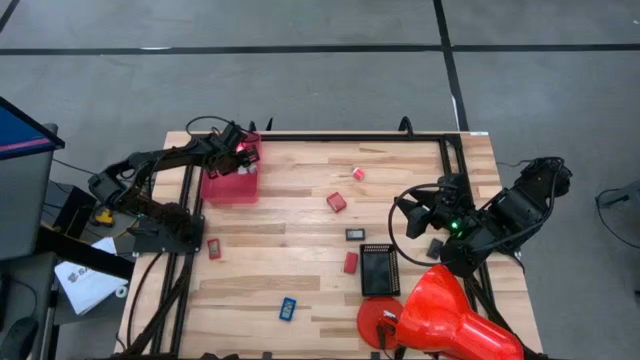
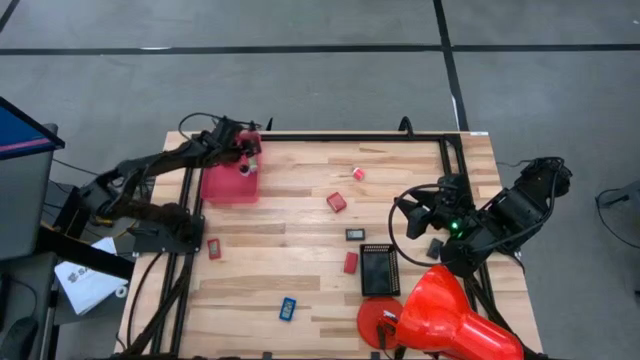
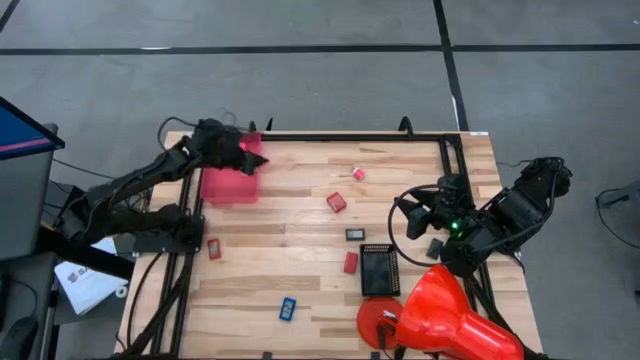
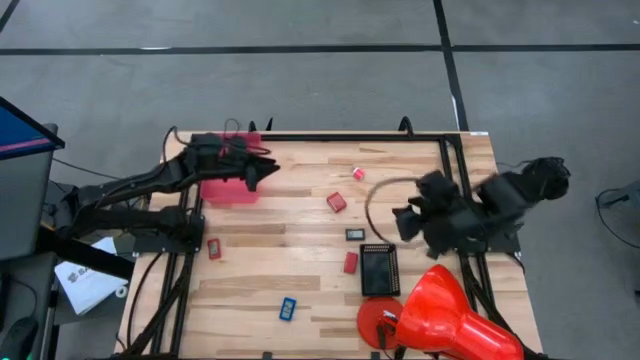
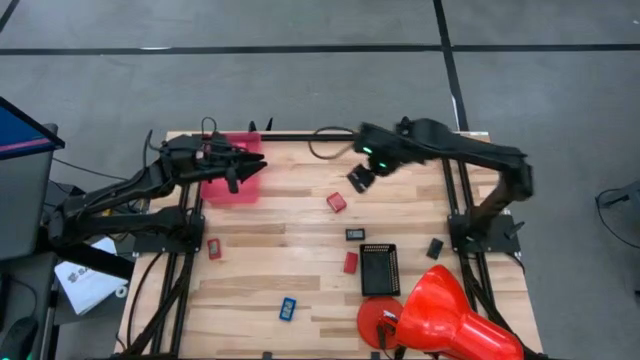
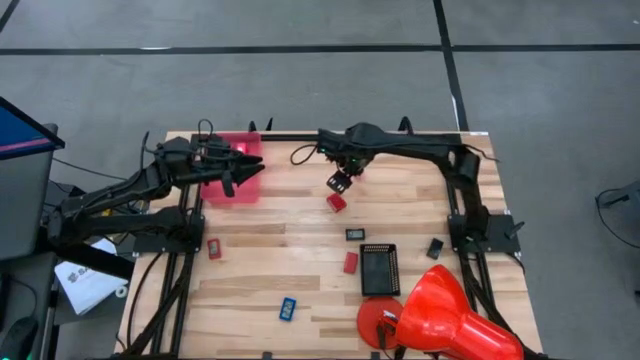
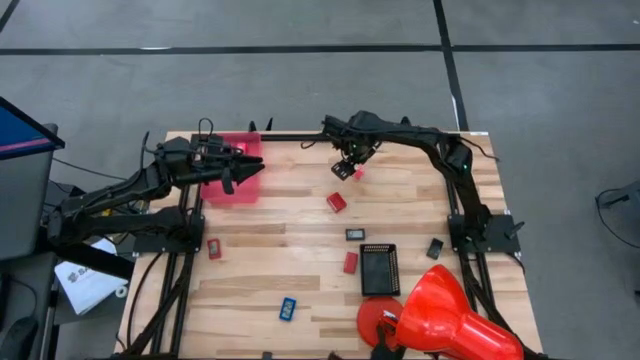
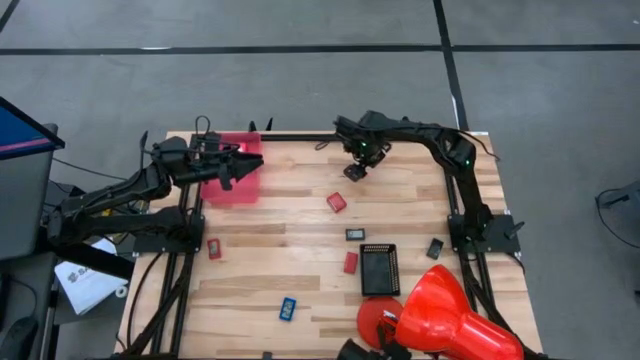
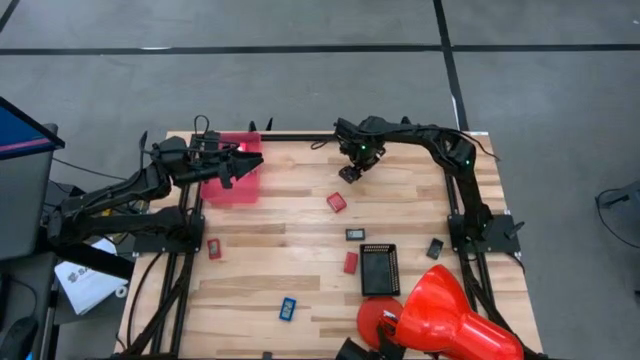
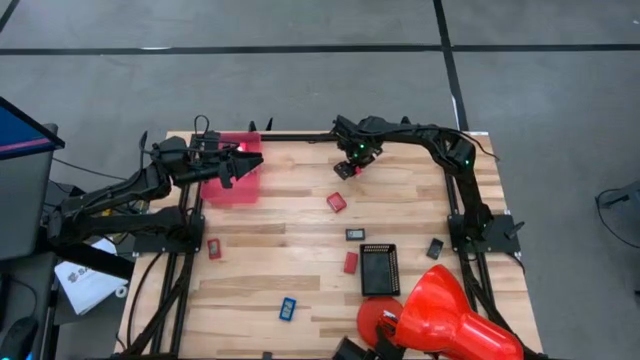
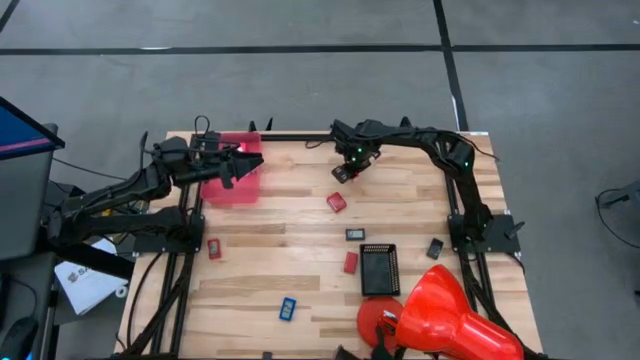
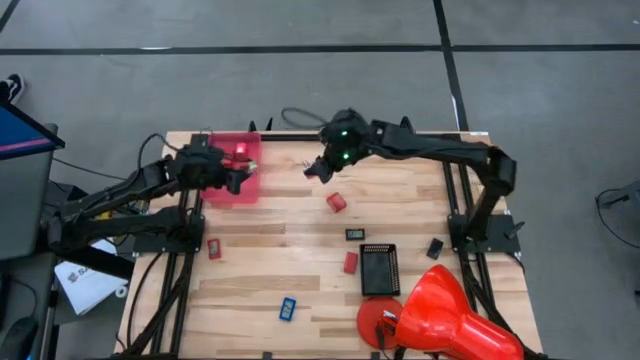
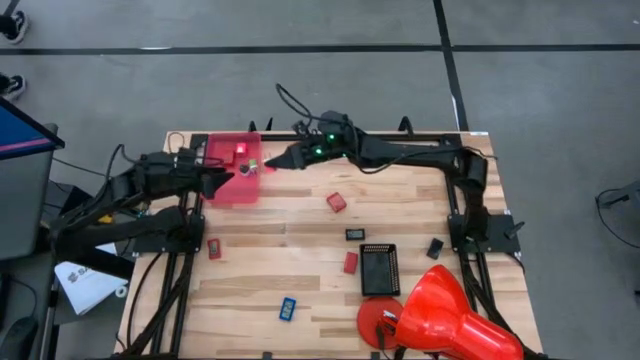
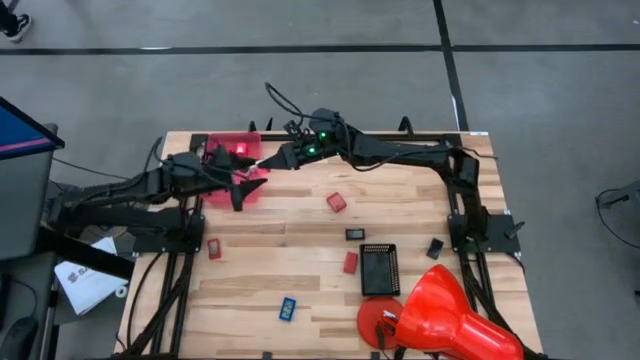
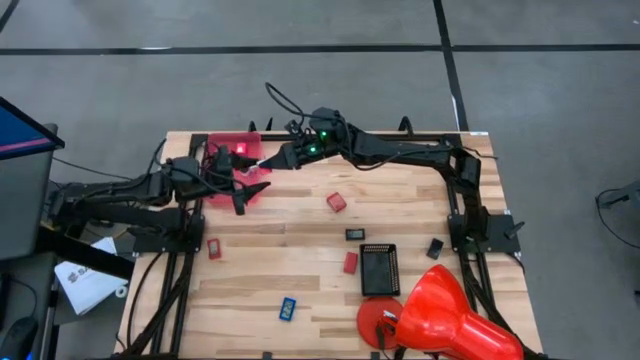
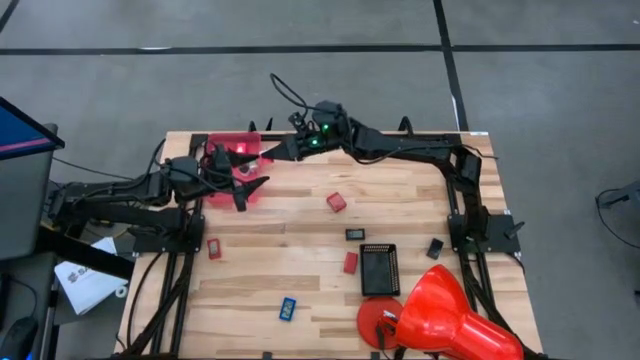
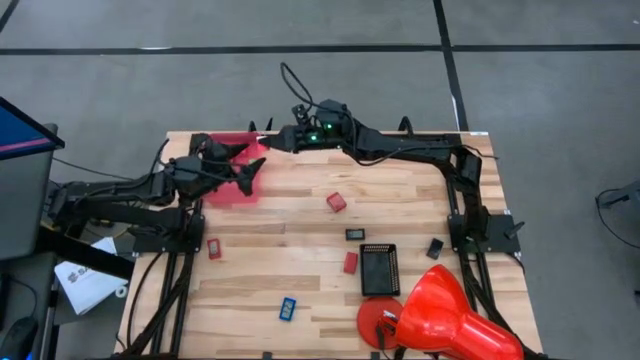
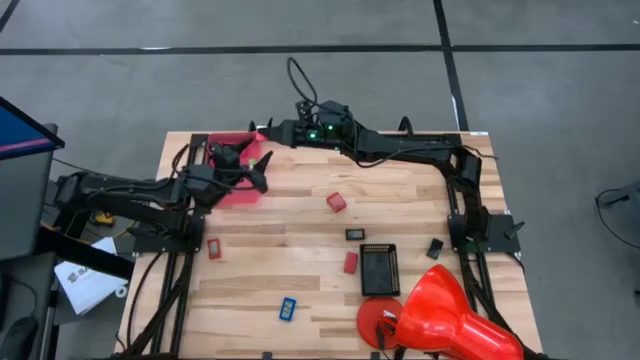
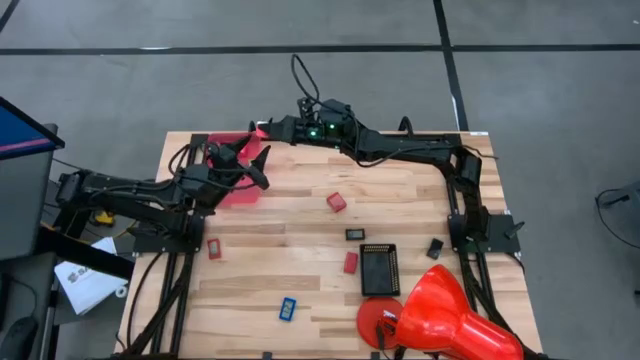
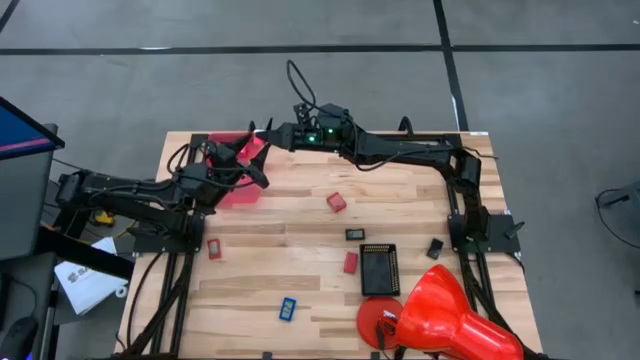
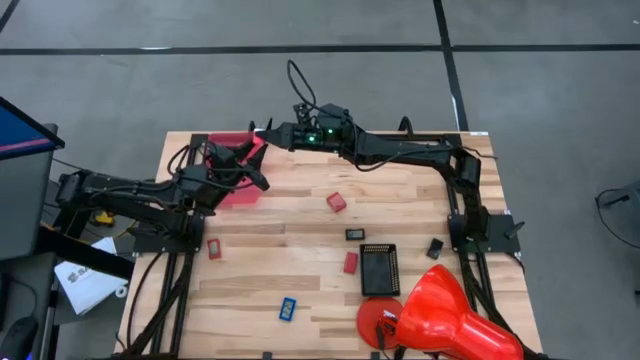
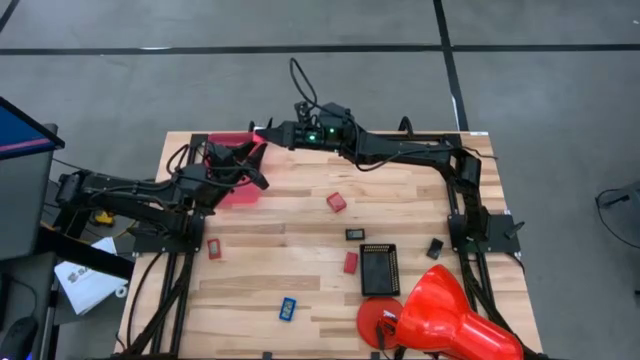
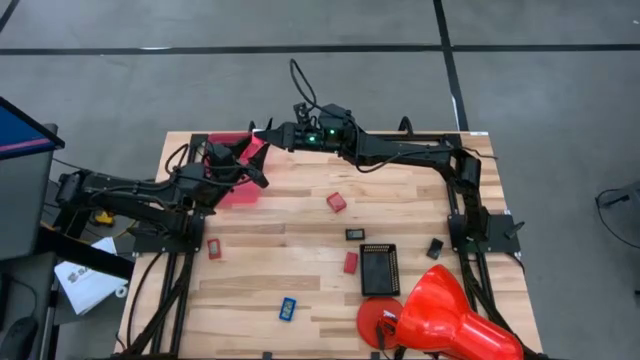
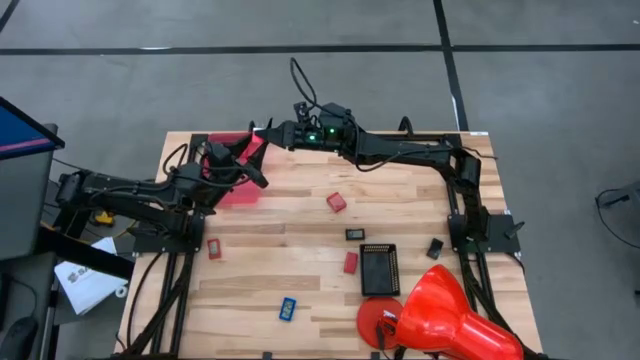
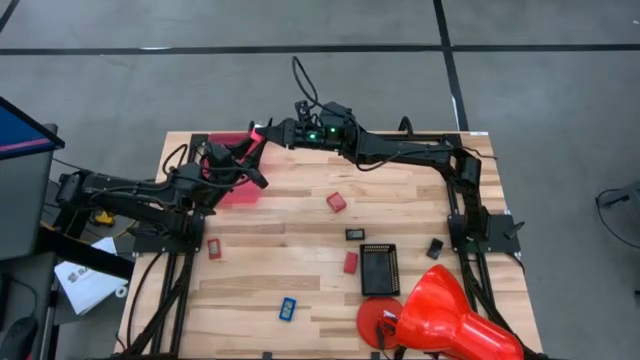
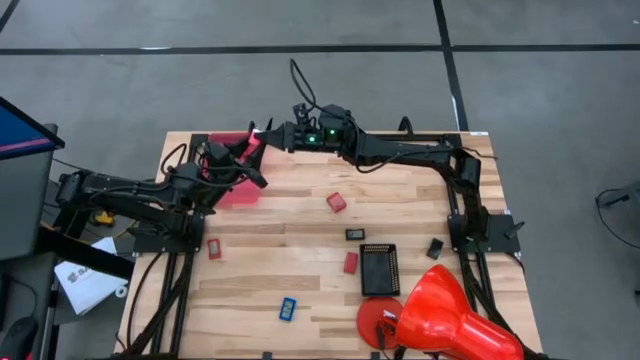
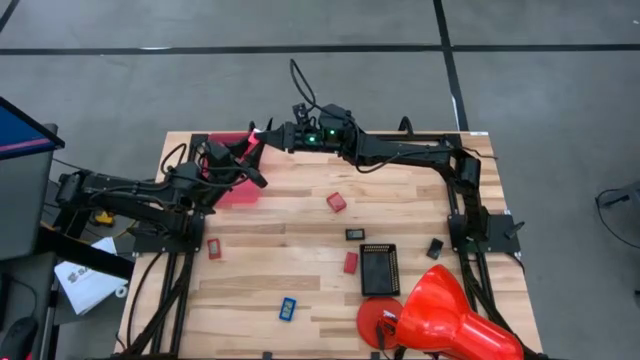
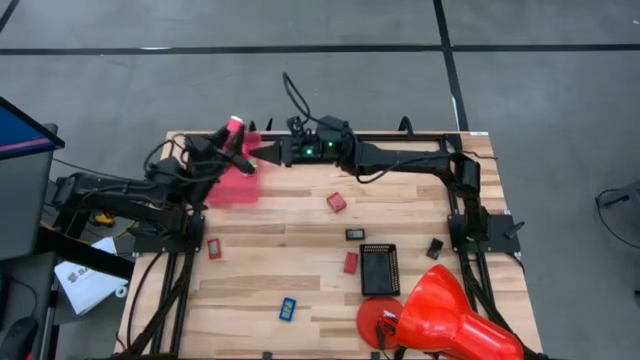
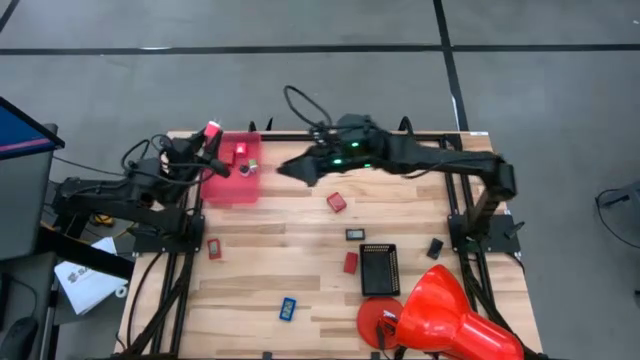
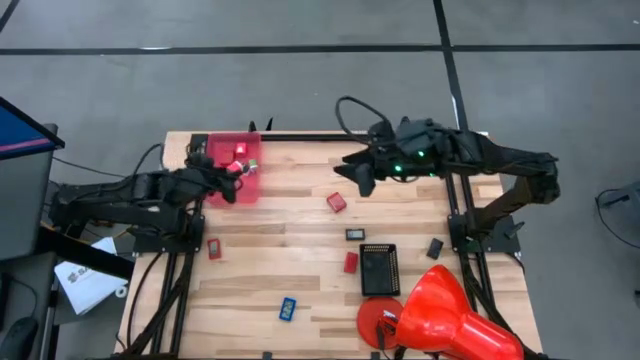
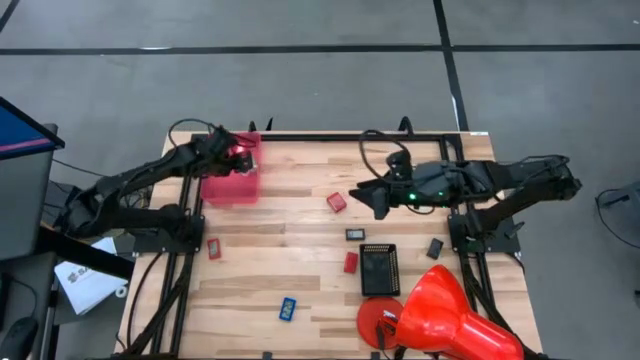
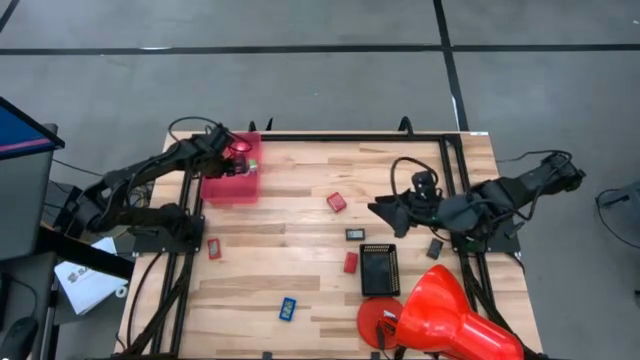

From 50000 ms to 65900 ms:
Task: Pick & Place Office items
Put the pink and white charger adapter into the pink bin

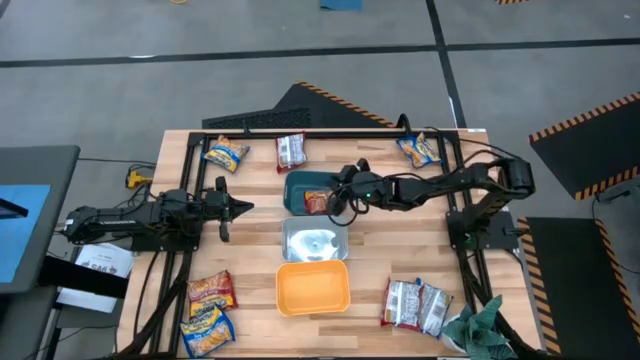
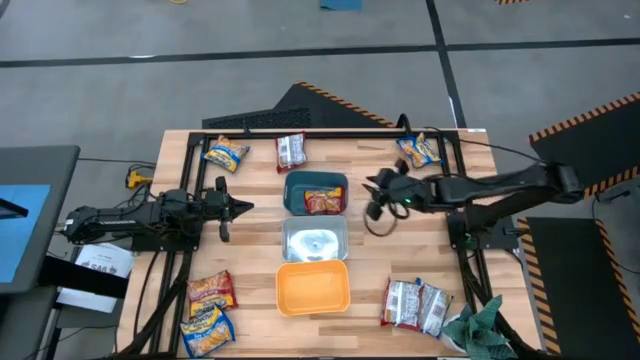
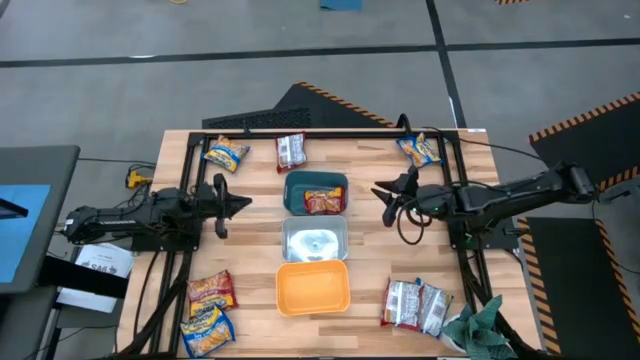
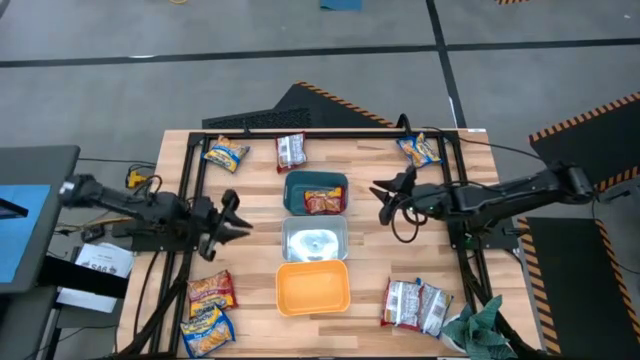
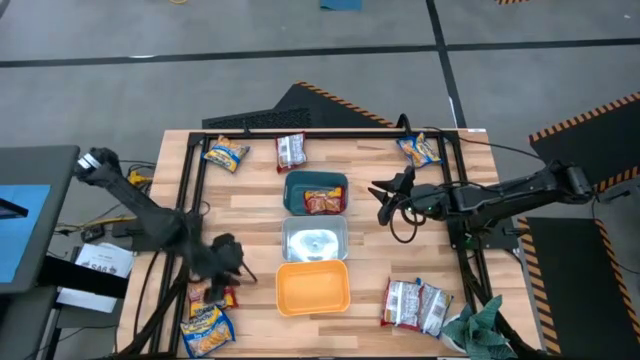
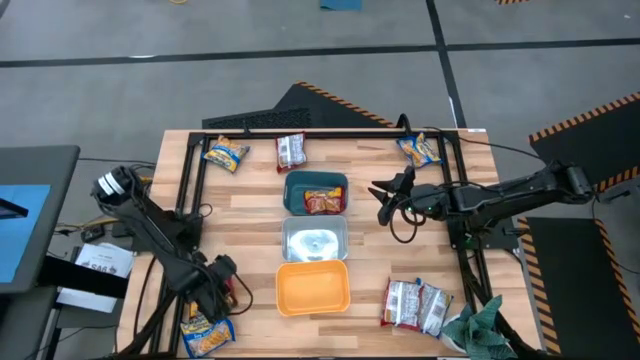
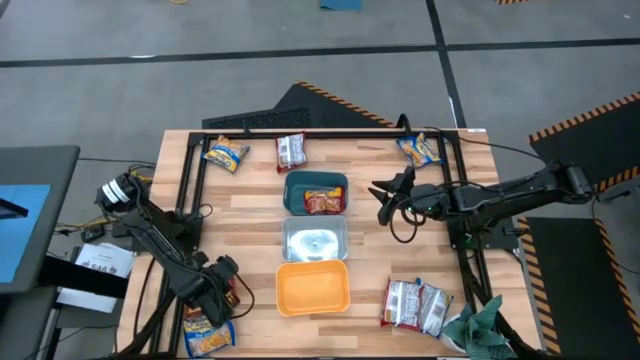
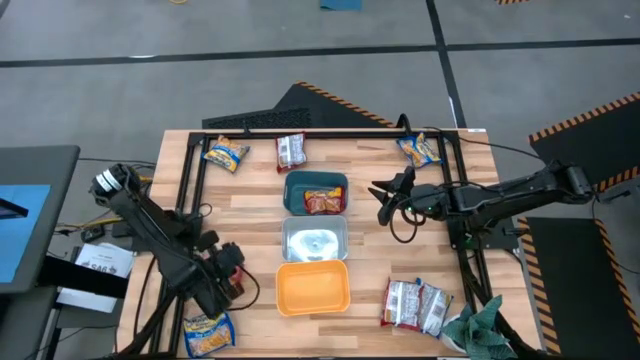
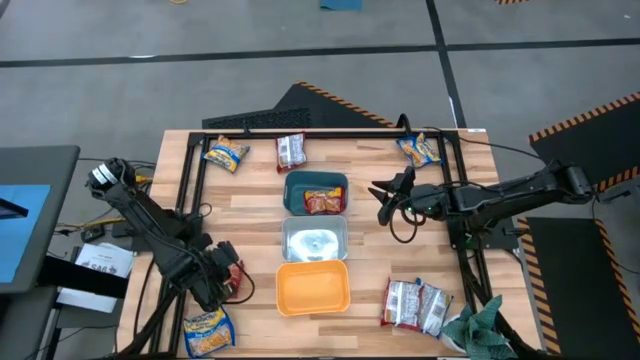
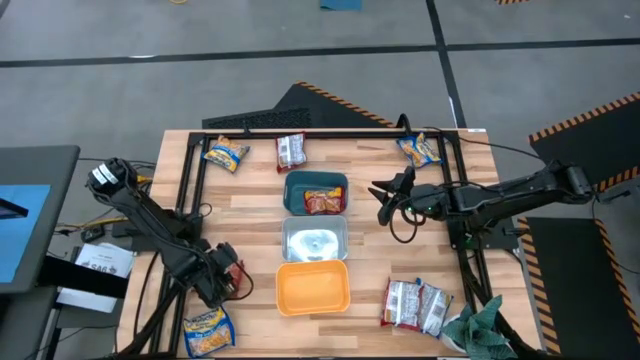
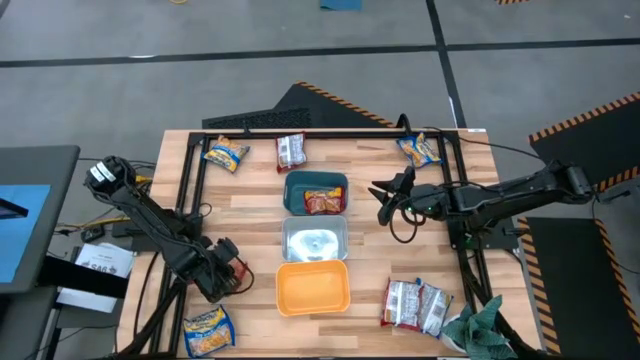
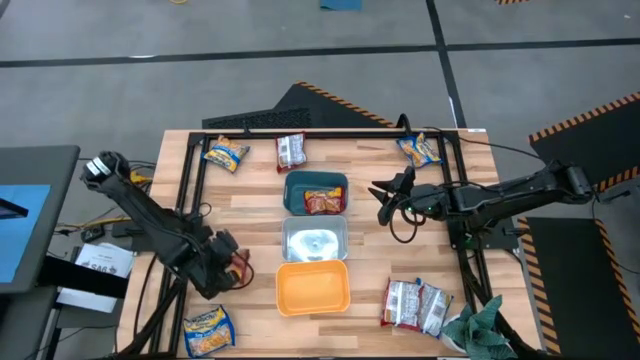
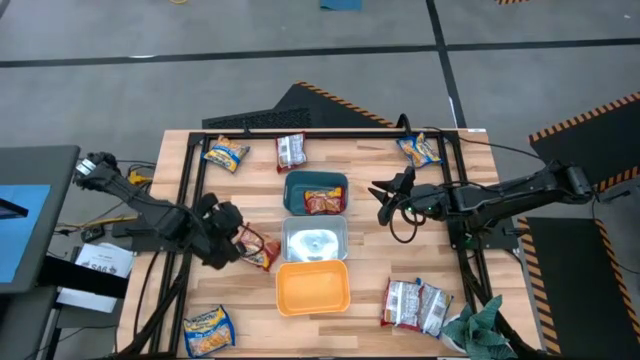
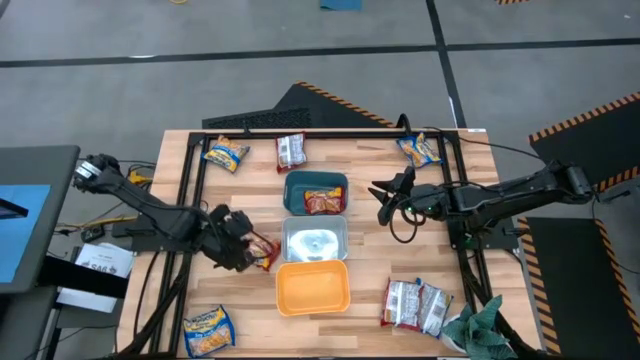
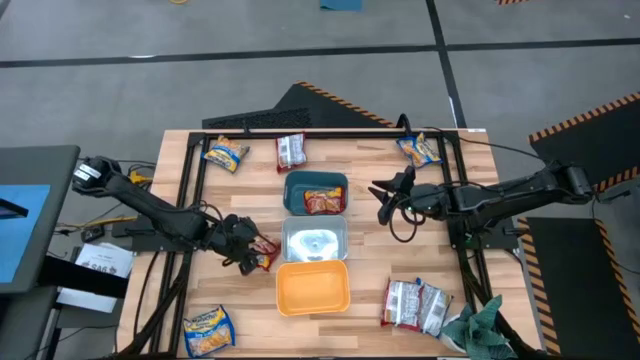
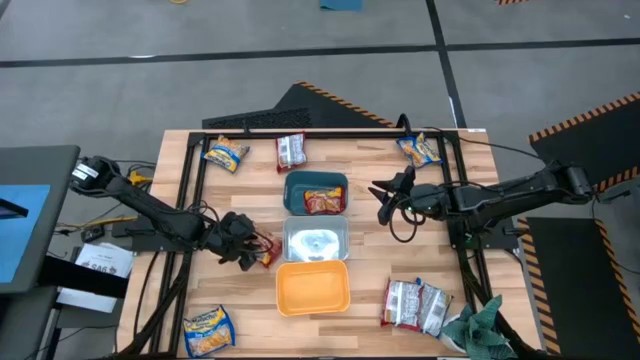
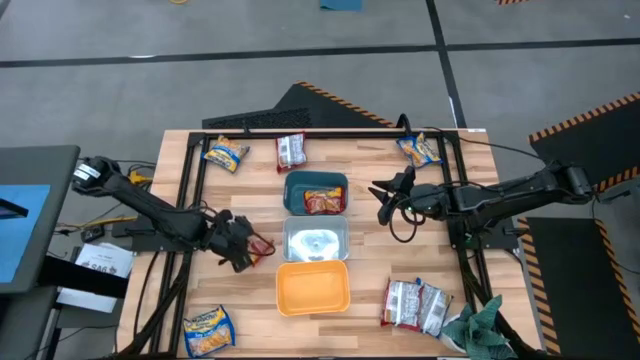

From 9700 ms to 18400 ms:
Task: Sort Maruchan noodles
Put the red noodle pack into the green bin
